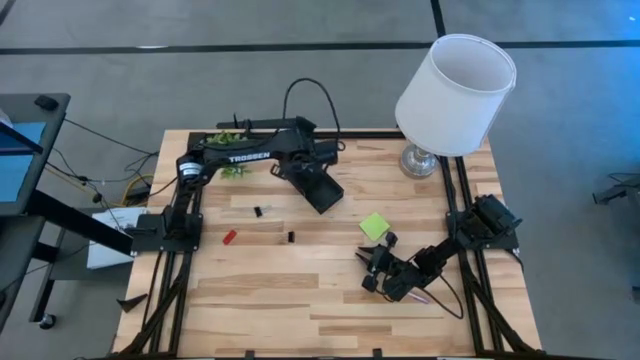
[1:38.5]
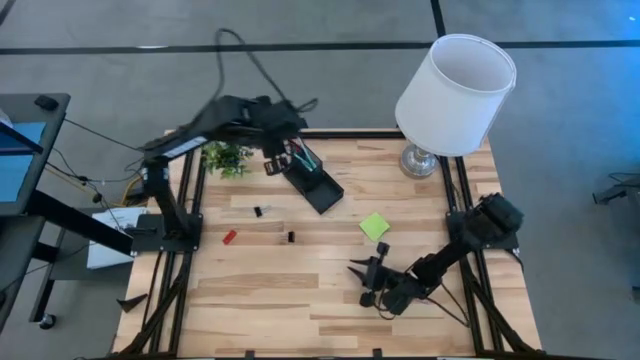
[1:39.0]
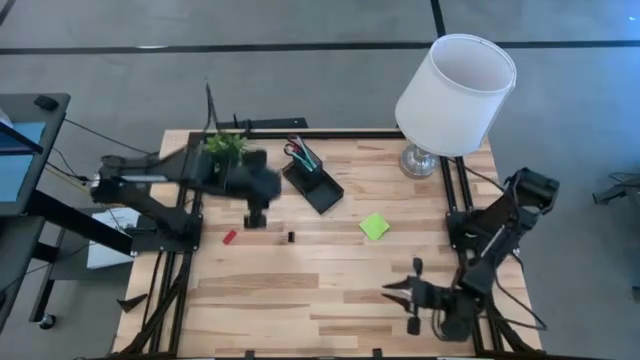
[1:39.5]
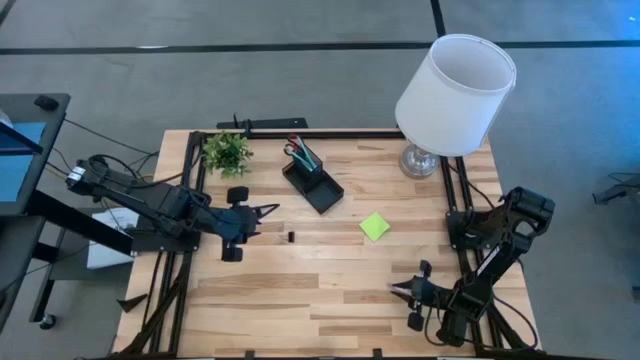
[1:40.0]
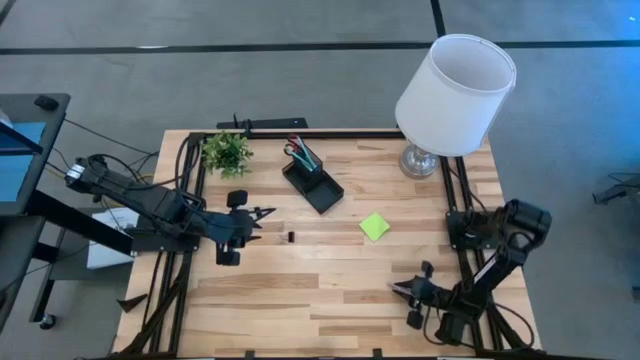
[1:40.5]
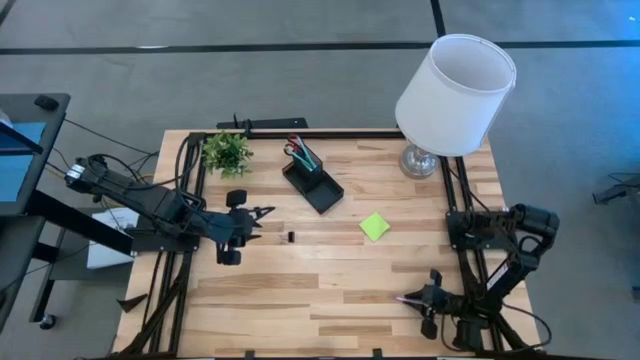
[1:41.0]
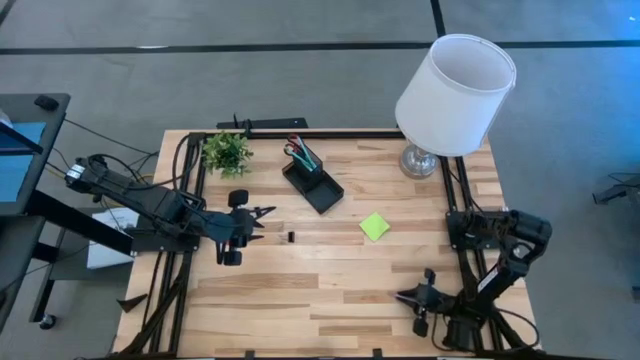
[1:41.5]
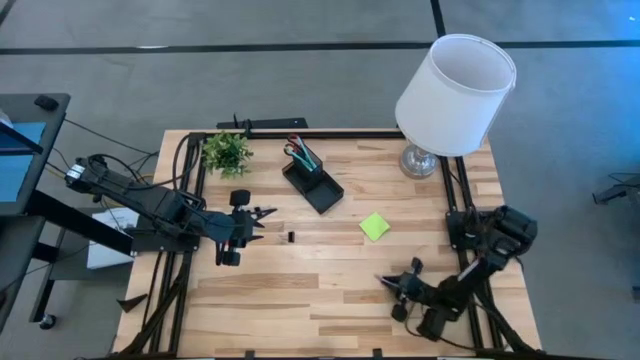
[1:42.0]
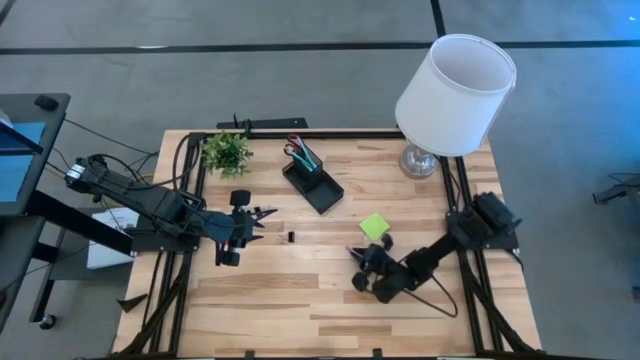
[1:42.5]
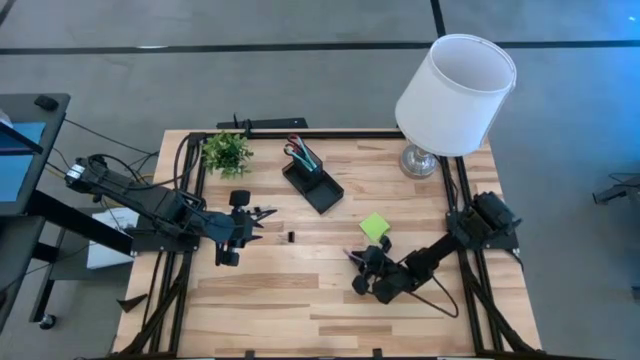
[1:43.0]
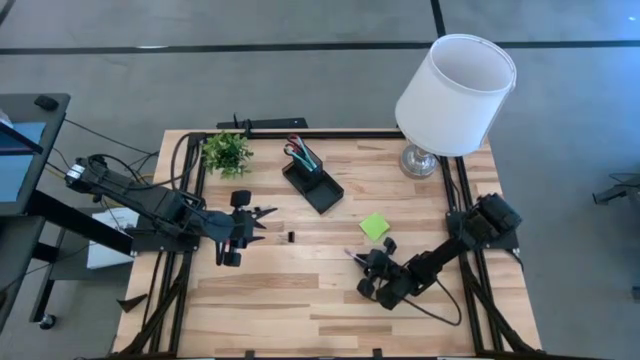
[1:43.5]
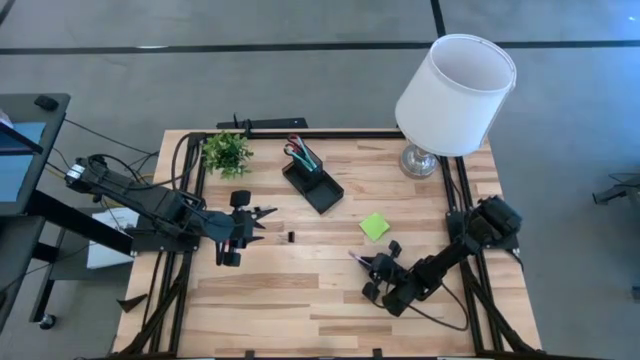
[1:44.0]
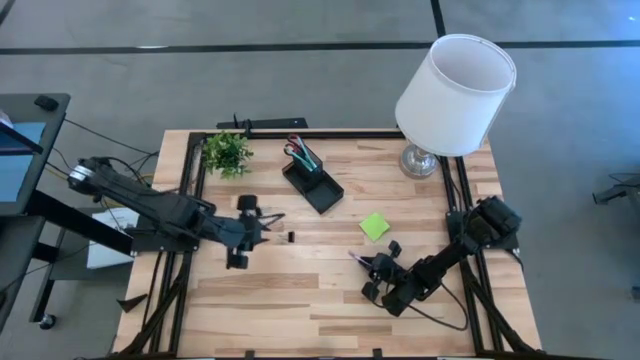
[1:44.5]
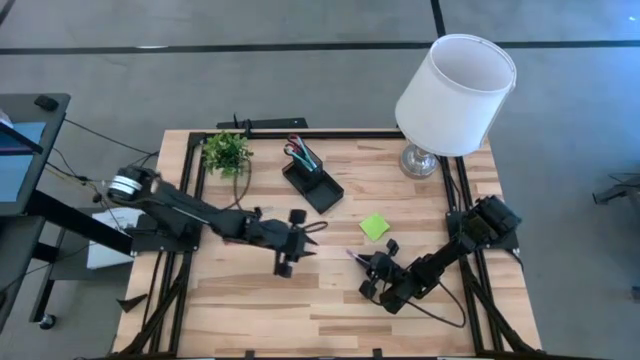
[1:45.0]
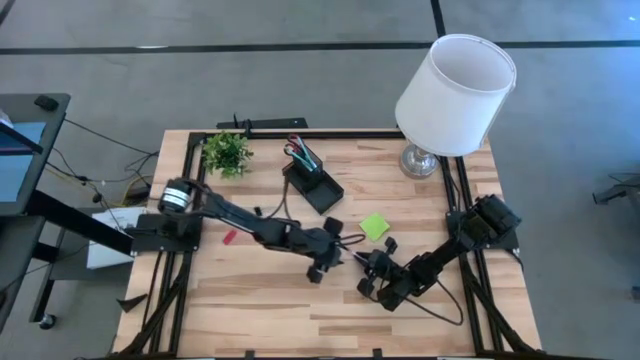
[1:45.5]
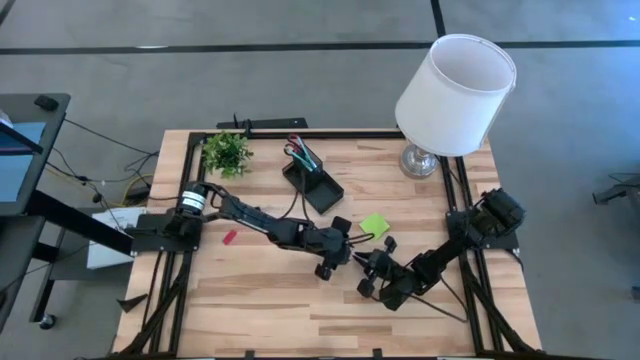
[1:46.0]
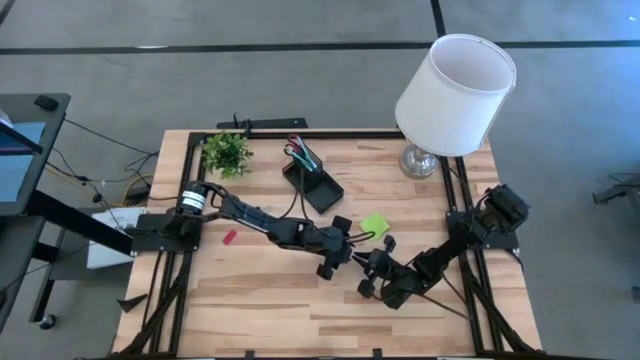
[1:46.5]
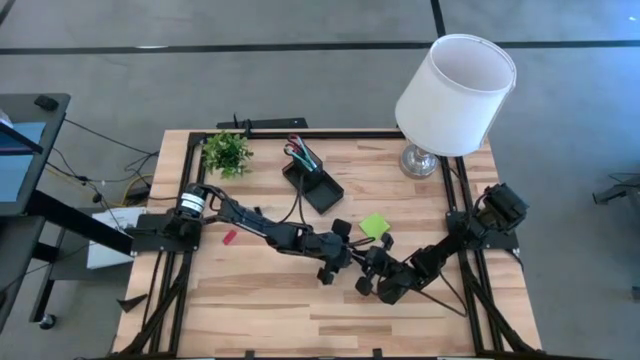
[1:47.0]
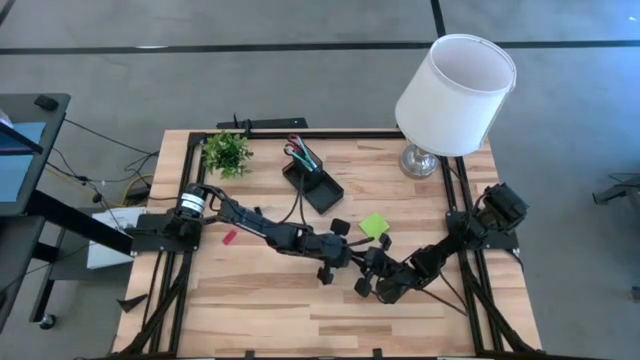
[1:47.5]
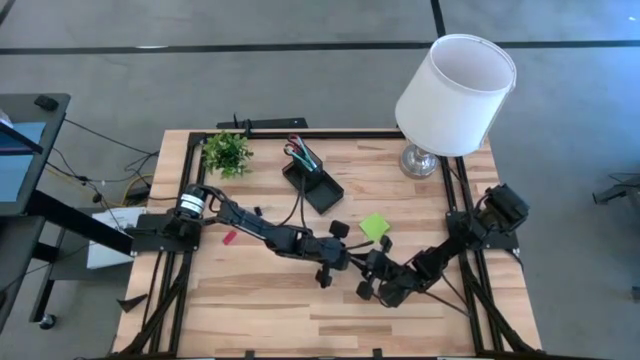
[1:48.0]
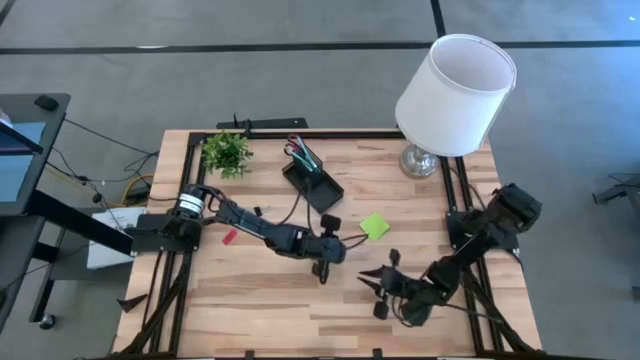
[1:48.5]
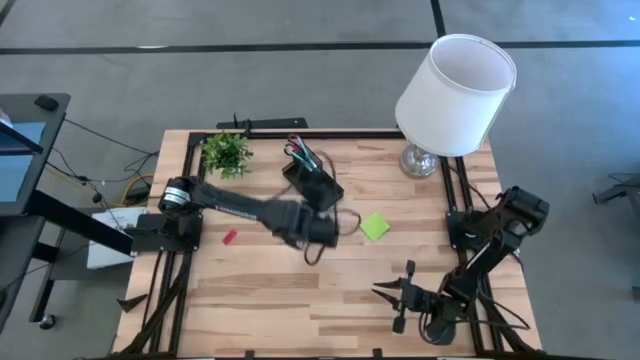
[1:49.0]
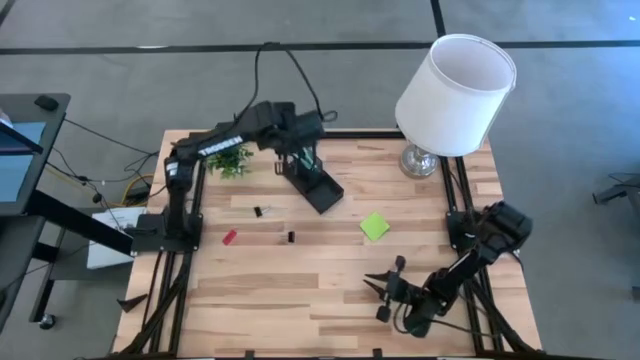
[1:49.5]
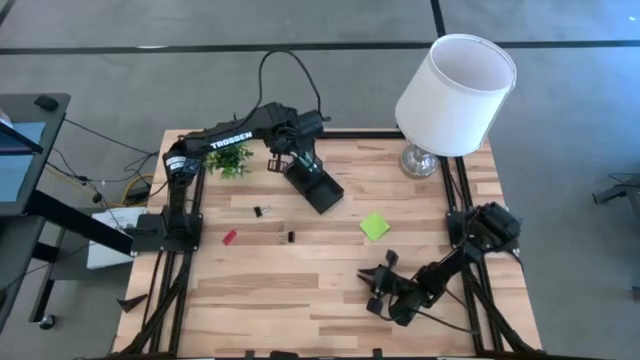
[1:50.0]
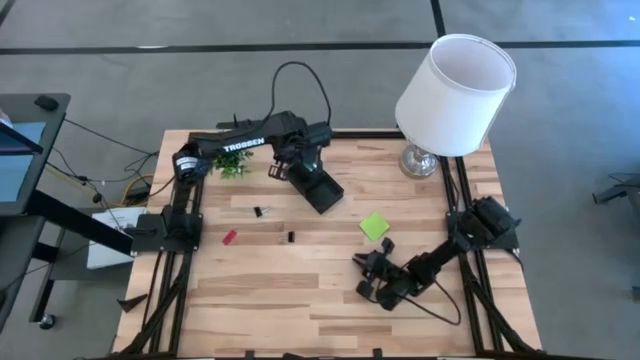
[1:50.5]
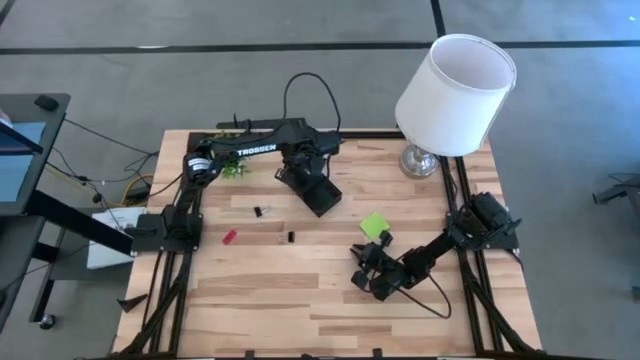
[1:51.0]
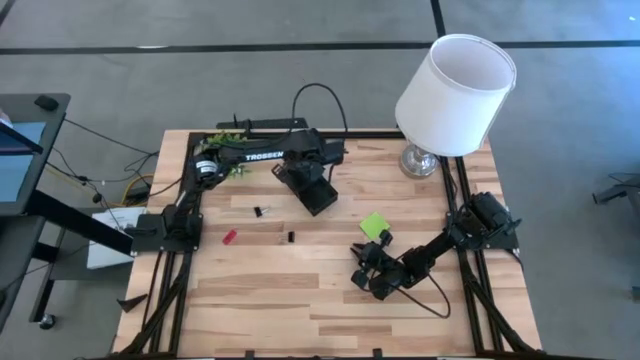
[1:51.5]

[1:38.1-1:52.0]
Task: Pick and place office supplies into organizer
Put the violet pen into the desk organizer

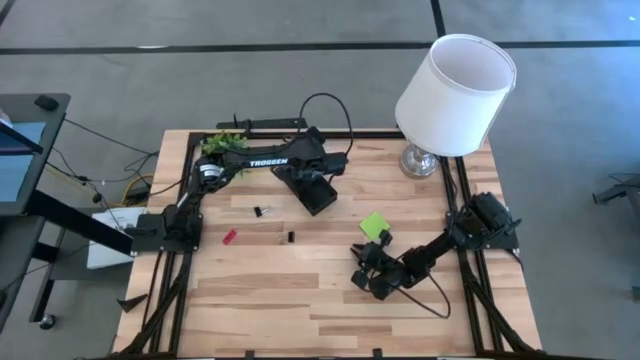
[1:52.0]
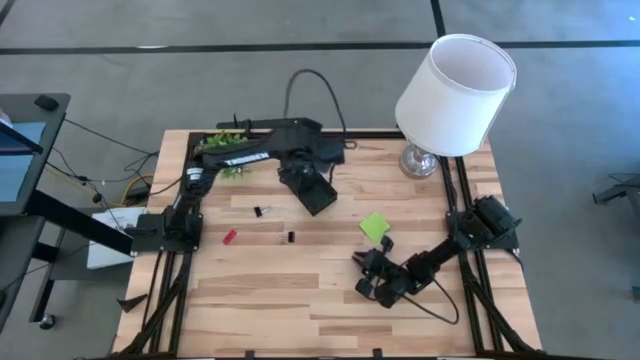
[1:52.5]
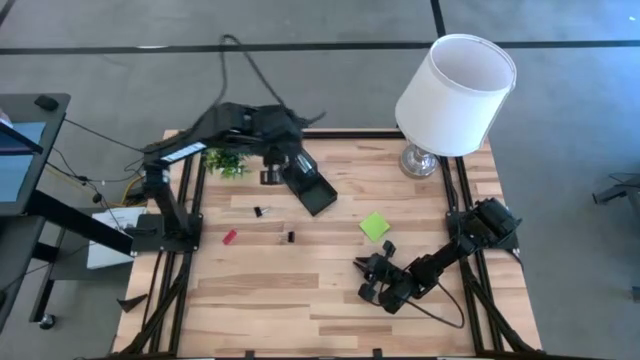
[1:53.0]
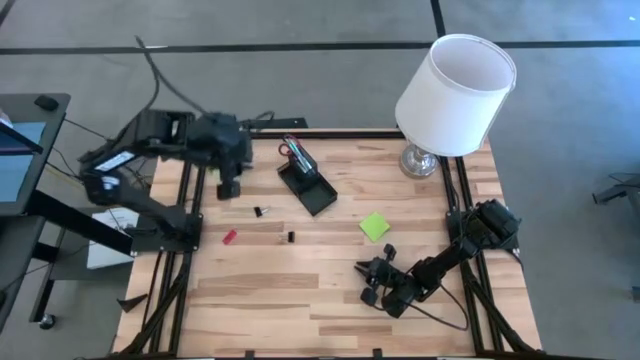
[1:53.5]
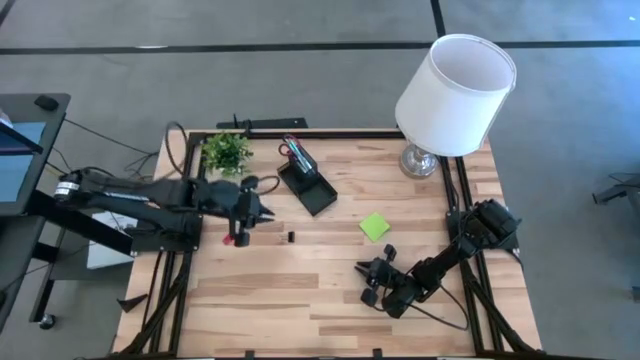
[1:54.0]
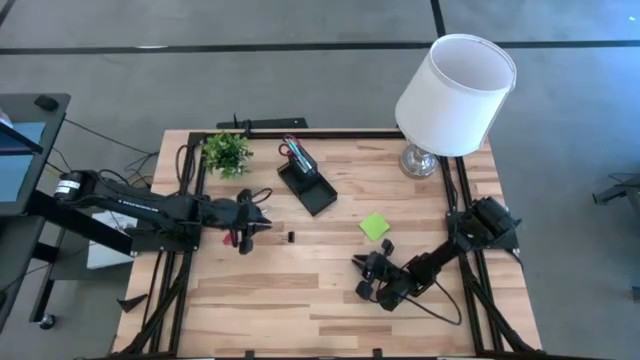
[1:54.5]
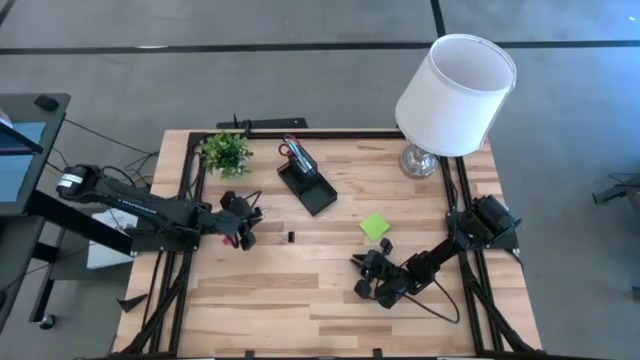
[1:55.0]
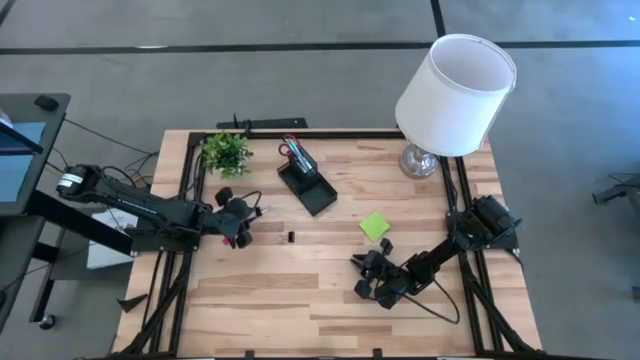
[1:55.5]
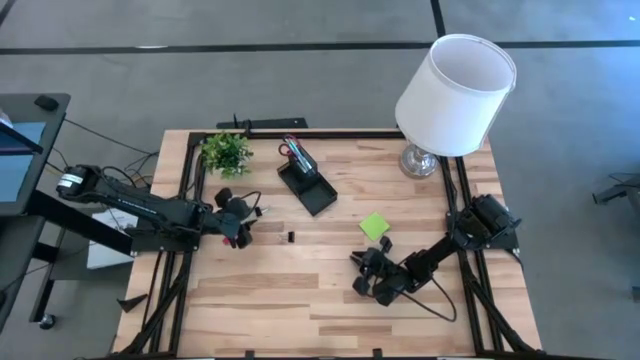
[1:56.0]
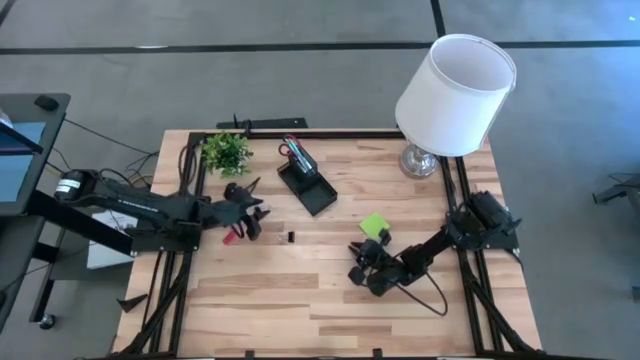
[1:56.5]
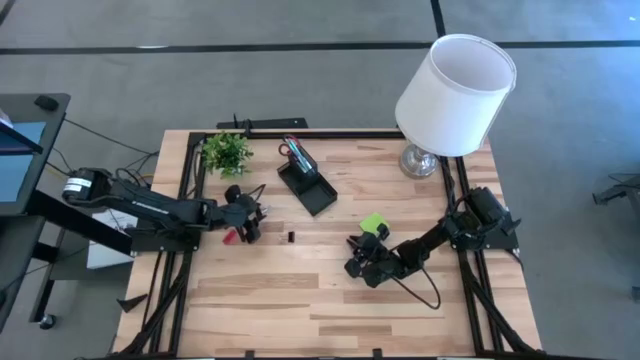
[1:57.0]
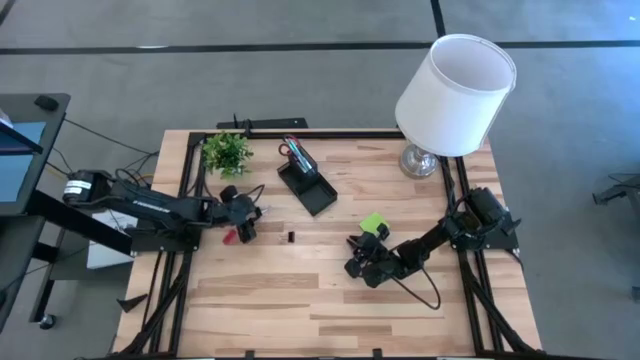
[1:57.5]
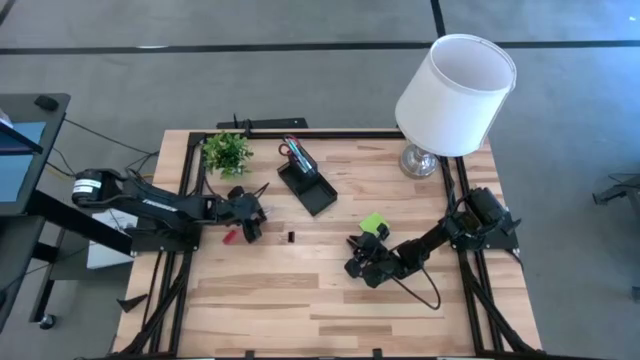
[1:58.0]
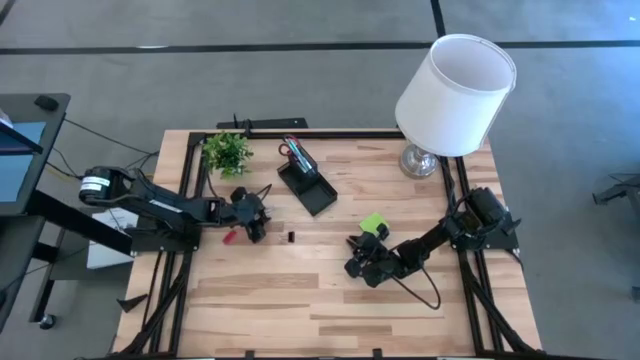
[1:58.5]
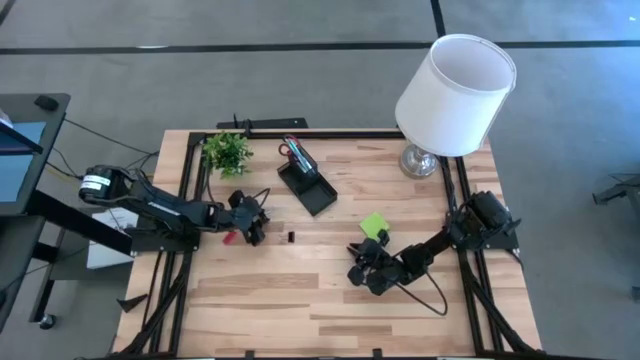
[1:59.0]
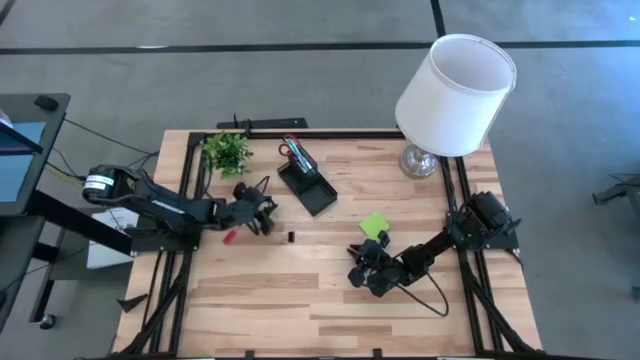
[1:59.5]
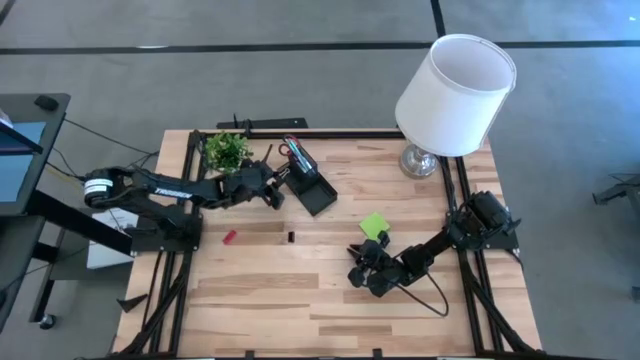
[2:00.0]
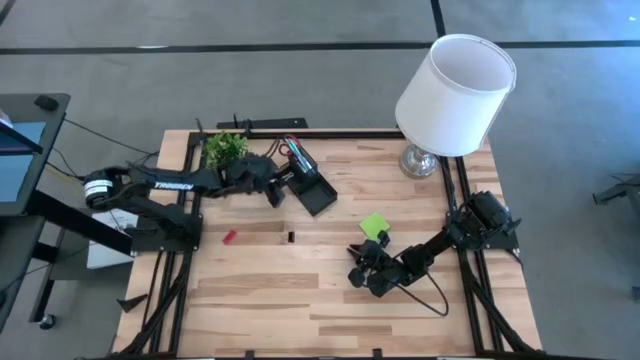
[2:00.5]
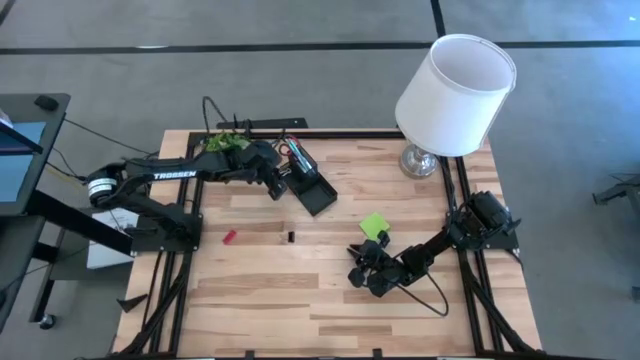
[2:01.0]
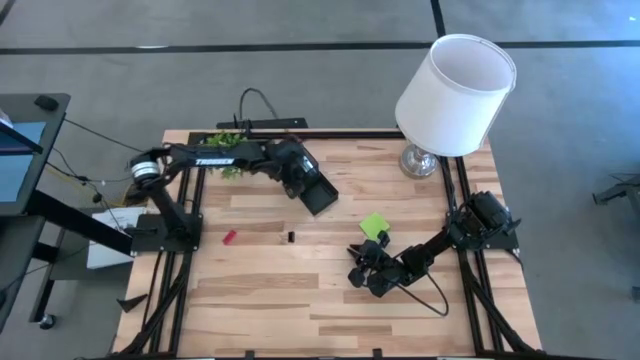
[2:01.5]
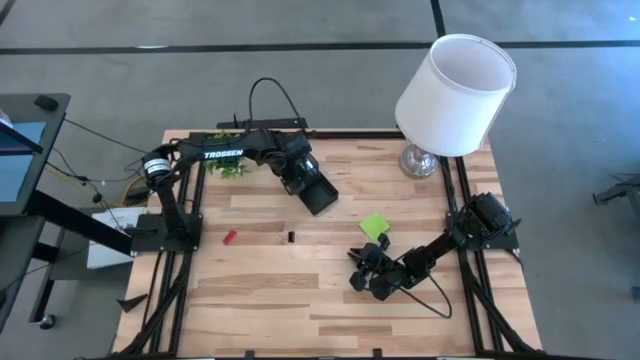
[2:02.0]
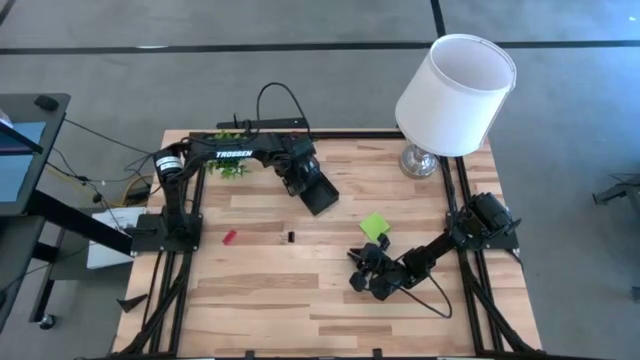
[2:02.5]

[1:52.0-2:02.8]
Put the top black binder clip into the desk organizer
